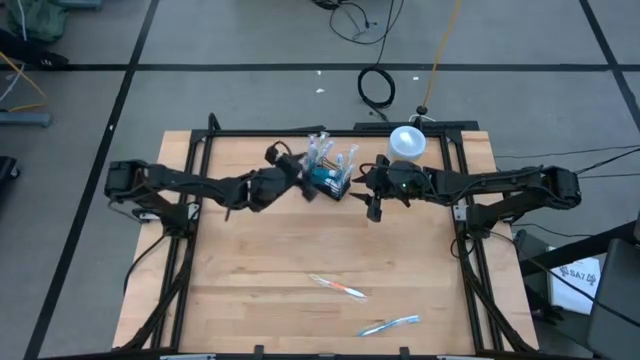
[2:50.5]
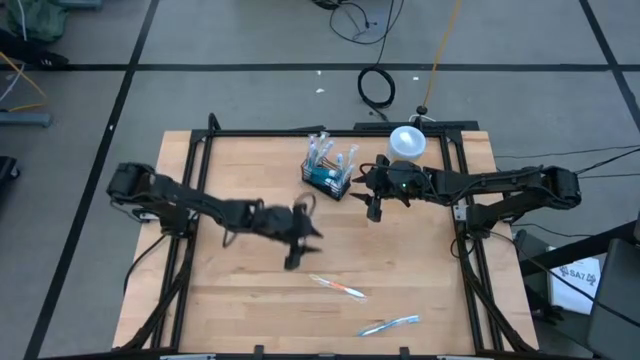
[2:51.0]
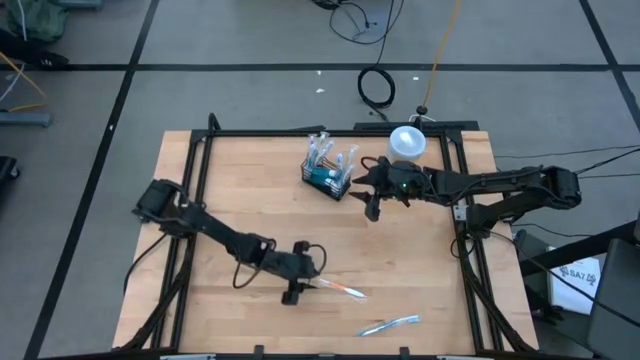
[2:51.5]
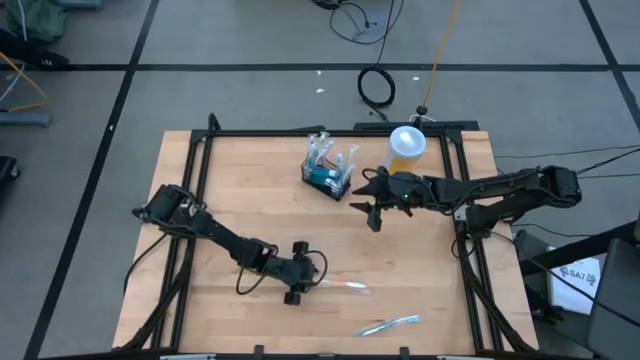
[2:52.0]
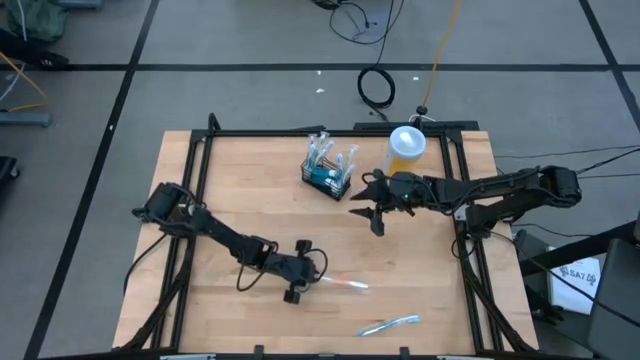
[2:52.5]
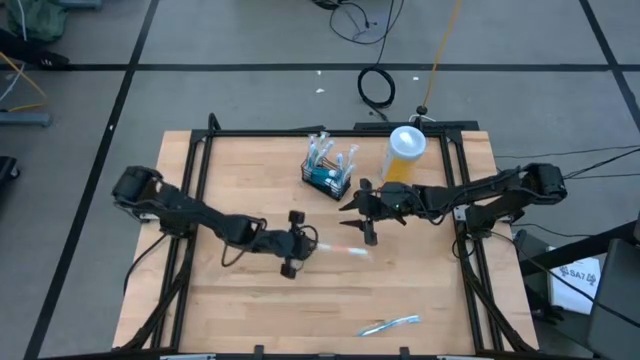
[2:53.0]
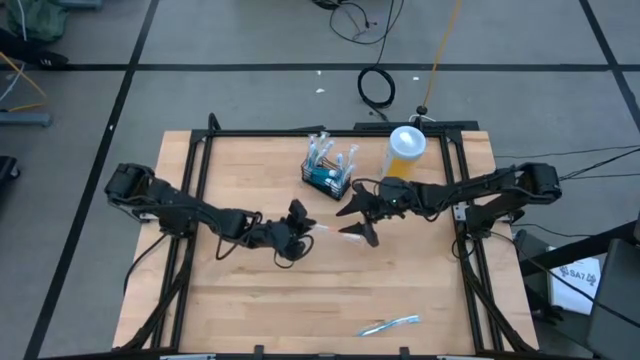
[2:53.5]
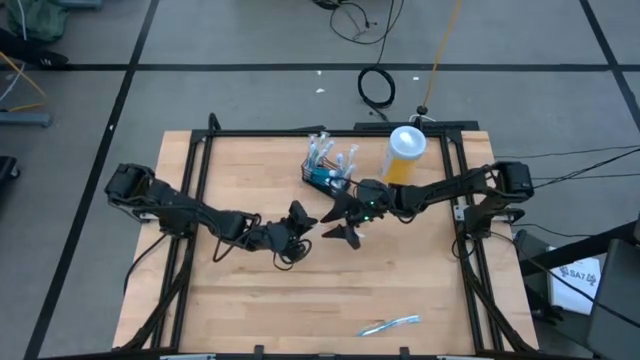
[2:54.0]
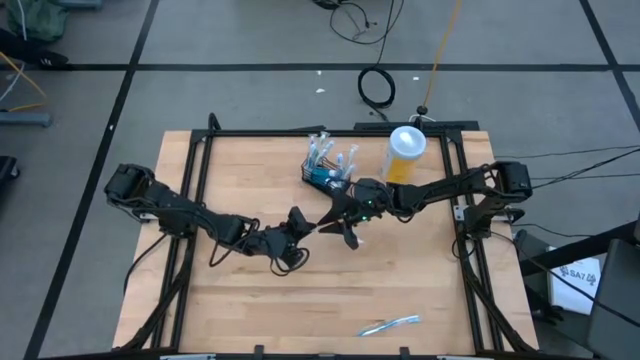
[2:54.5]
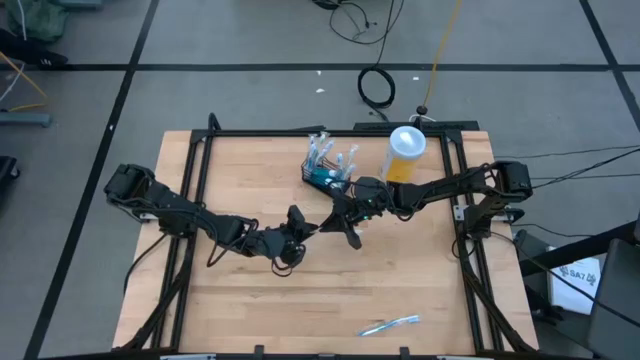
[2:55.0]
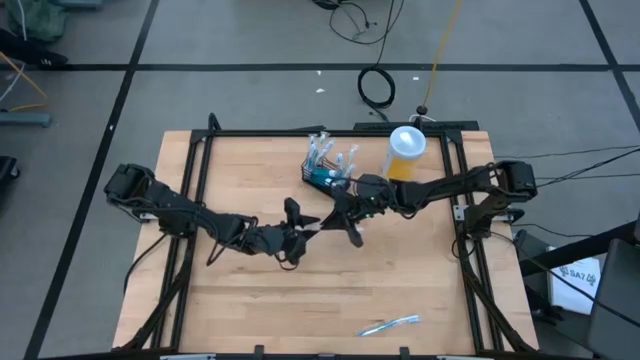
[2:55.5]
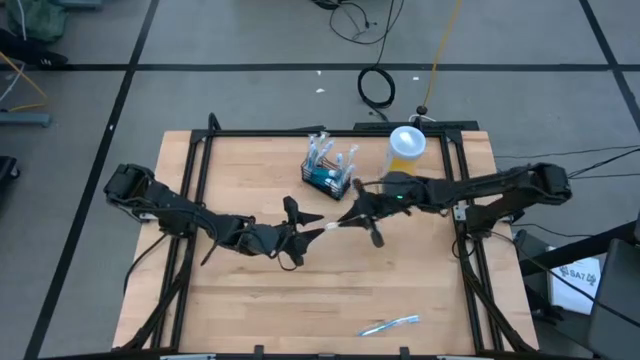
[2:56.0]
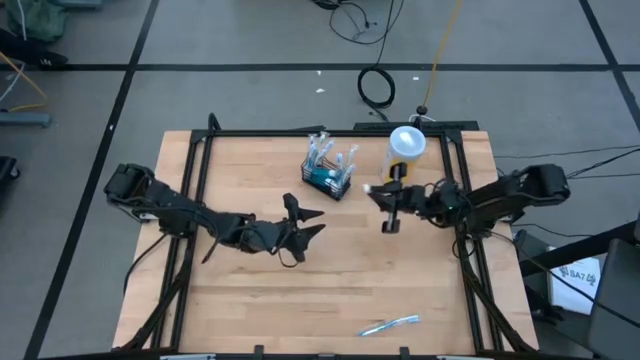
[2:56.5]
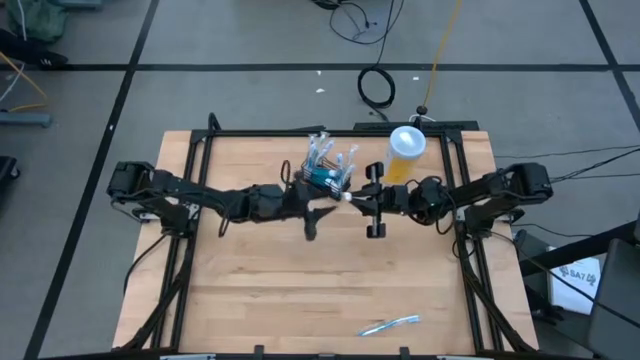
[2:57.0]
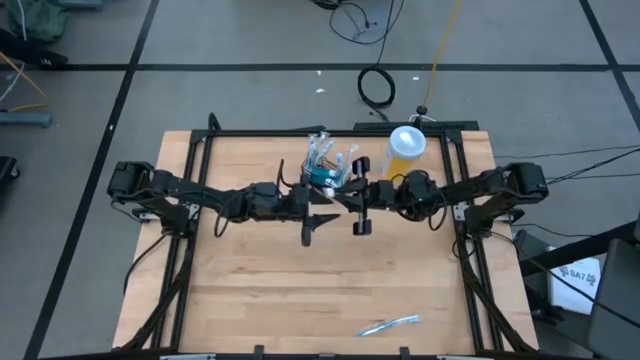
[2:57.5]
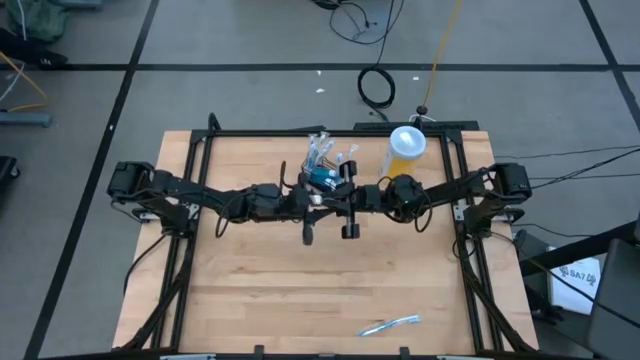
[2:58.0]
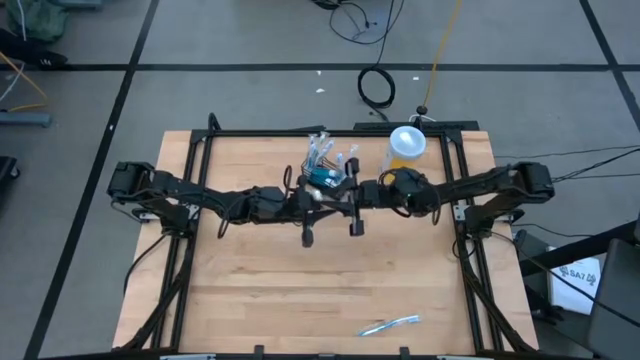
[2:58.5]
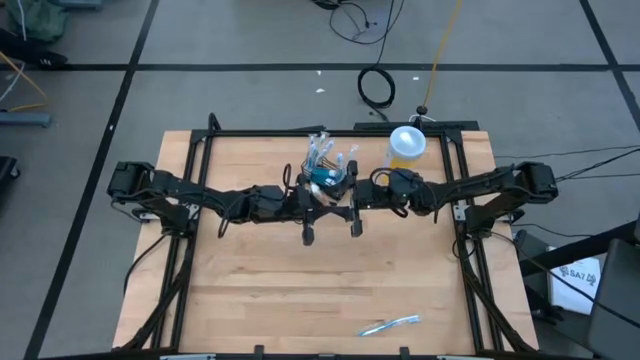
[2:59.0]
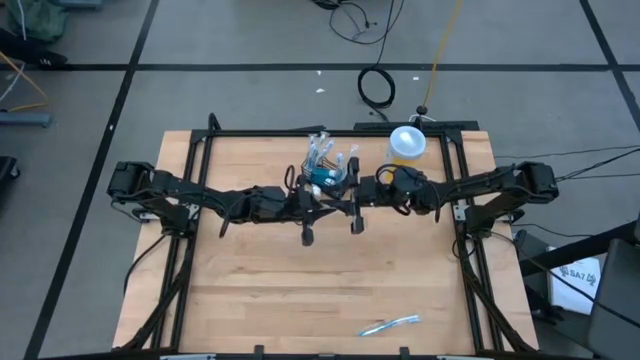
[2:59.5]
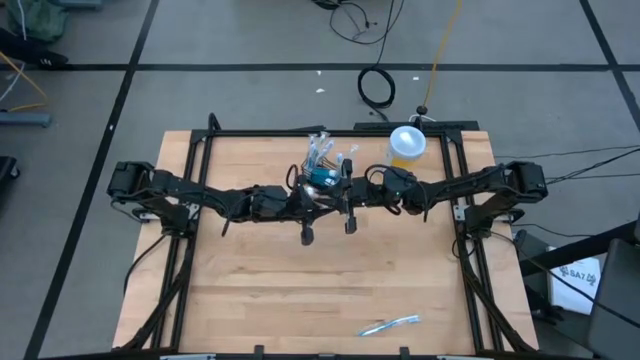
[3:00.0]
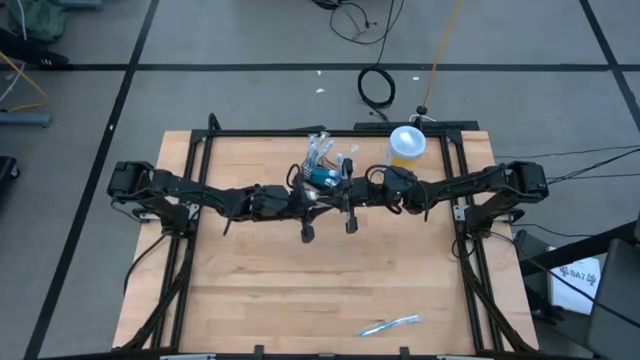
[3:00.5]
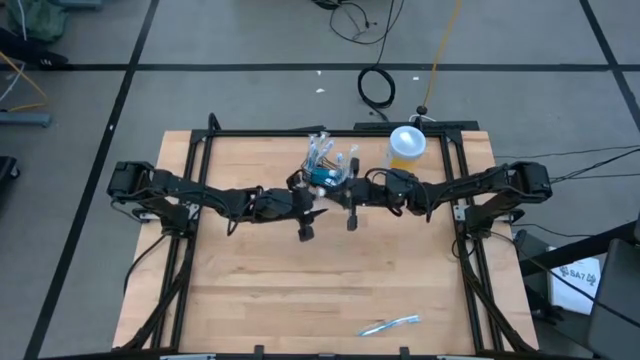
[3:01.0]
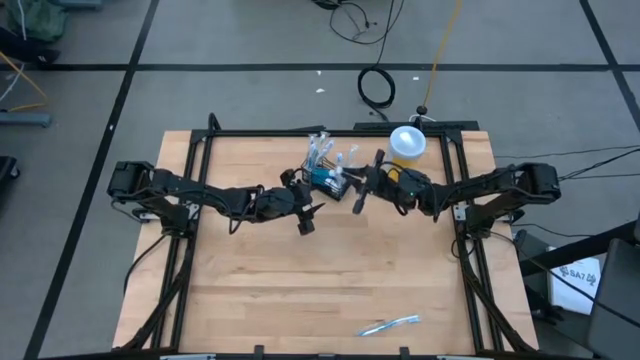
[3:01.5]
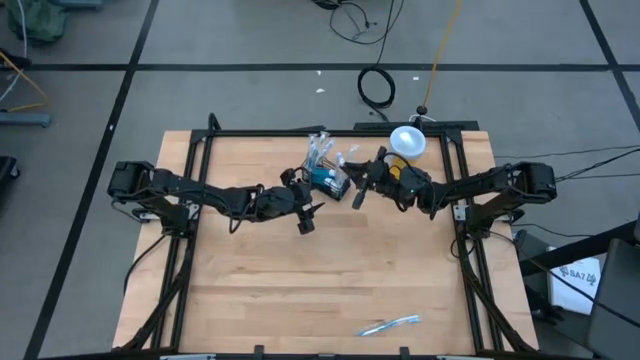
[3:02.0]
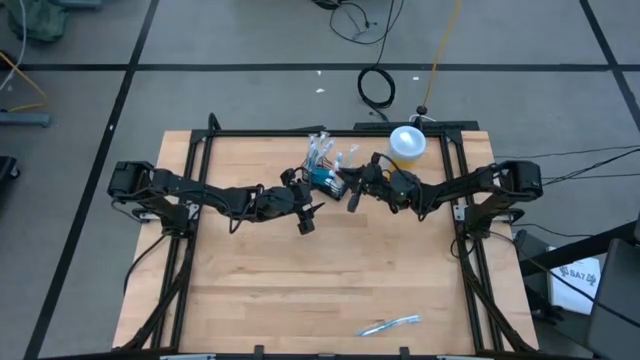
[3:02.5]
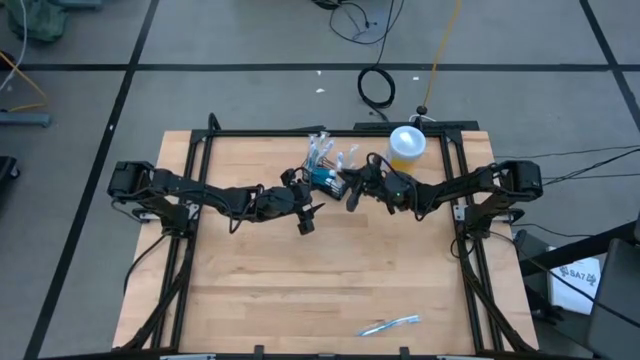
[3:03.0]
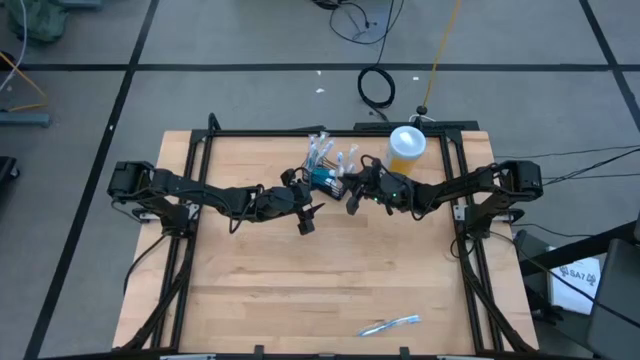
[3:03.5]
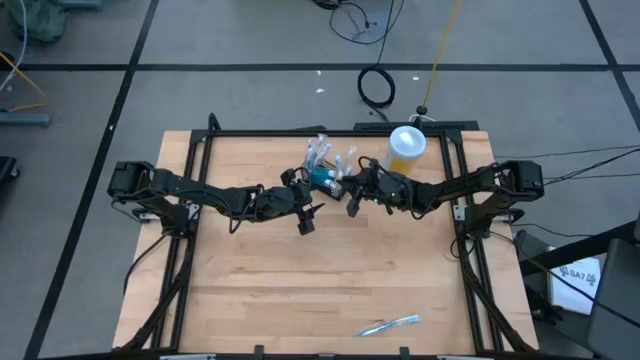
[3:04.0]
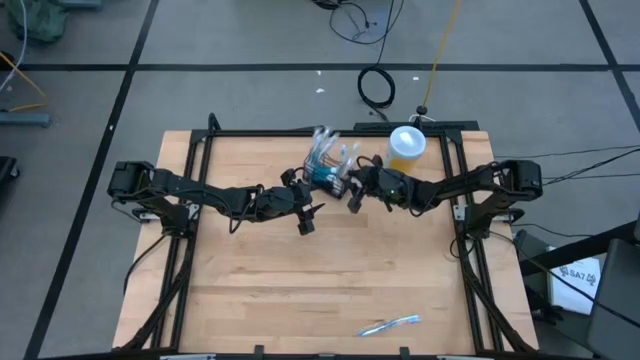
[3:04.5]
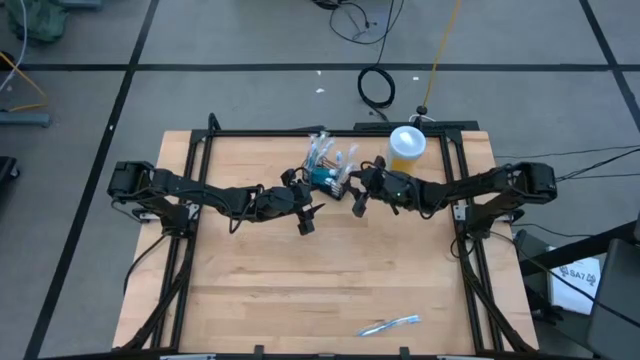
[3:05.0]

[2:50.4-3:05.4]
Task: Pick & Place toothbrushing station
Put the orange toothbrush into the black organizer

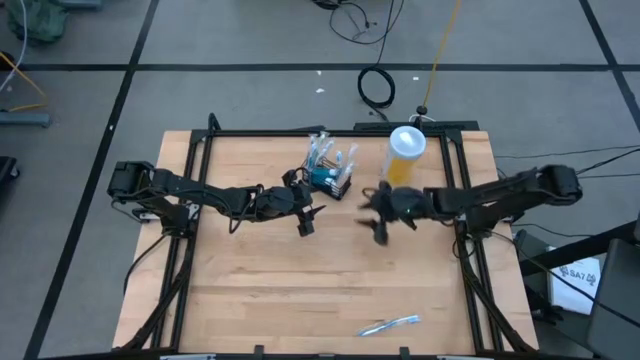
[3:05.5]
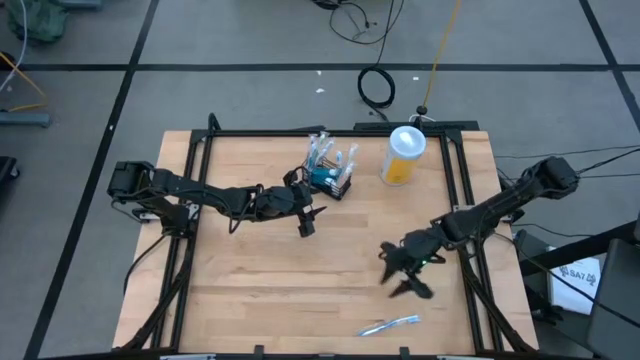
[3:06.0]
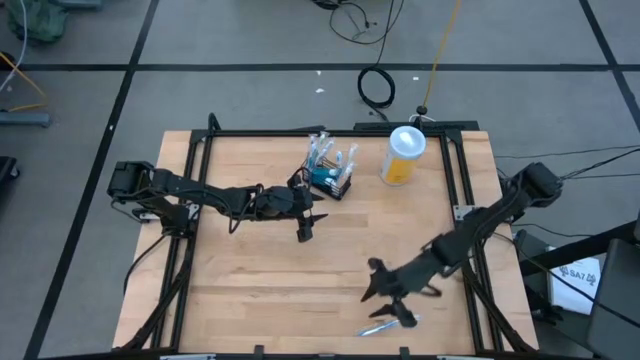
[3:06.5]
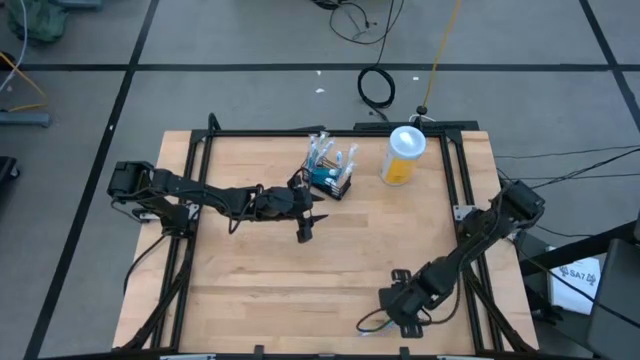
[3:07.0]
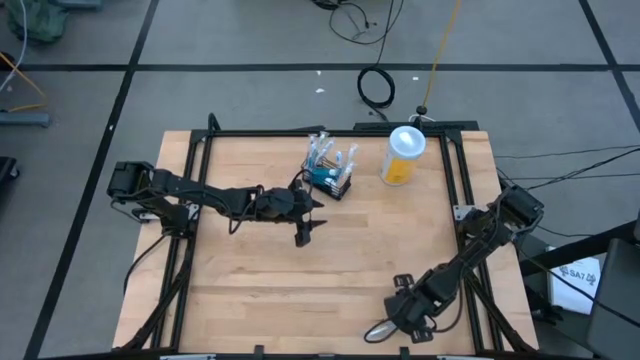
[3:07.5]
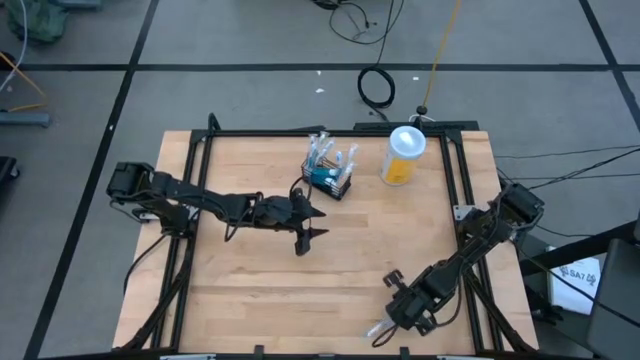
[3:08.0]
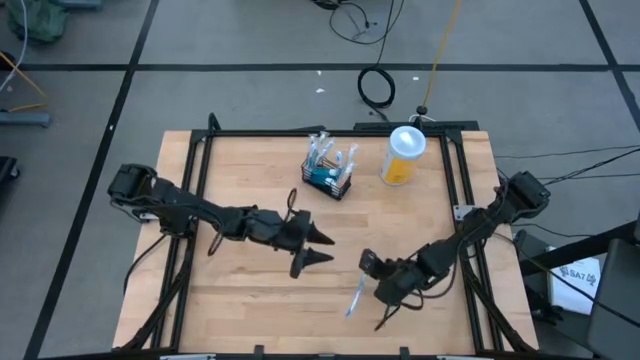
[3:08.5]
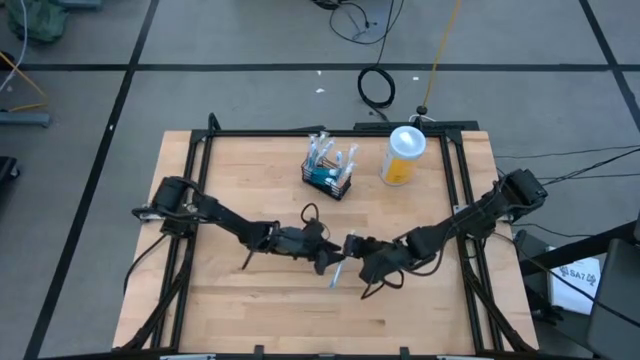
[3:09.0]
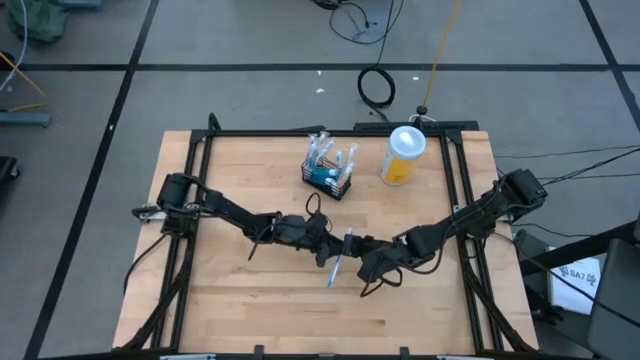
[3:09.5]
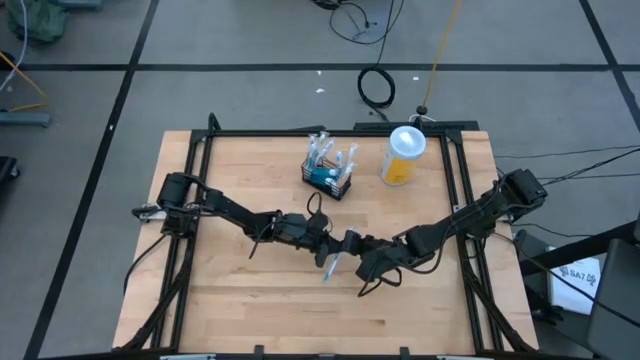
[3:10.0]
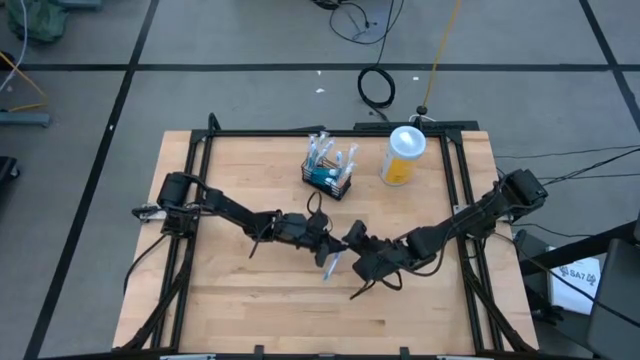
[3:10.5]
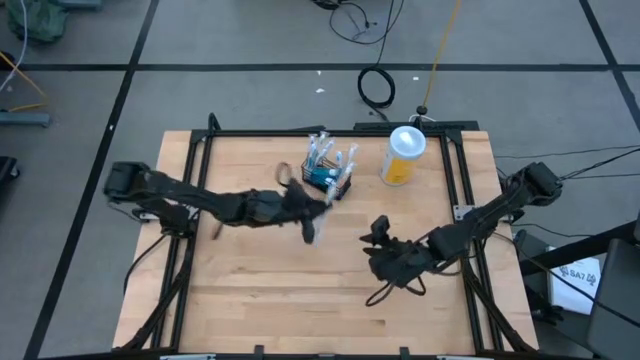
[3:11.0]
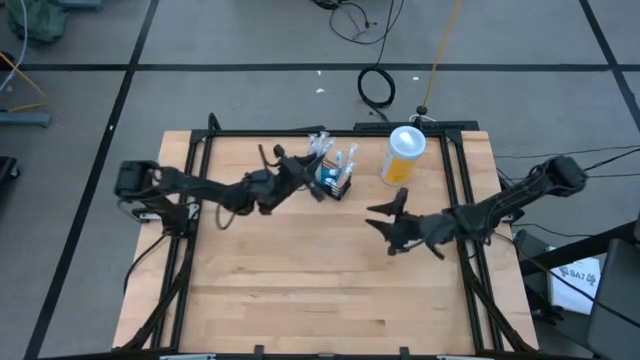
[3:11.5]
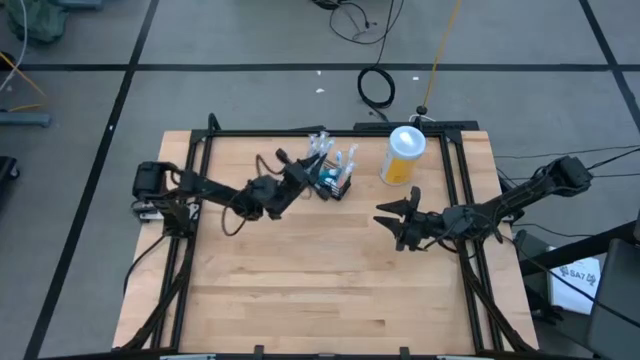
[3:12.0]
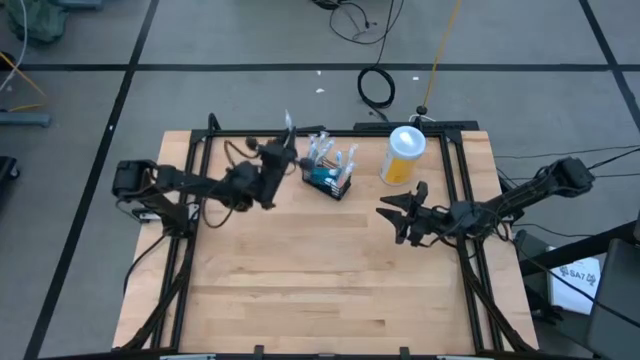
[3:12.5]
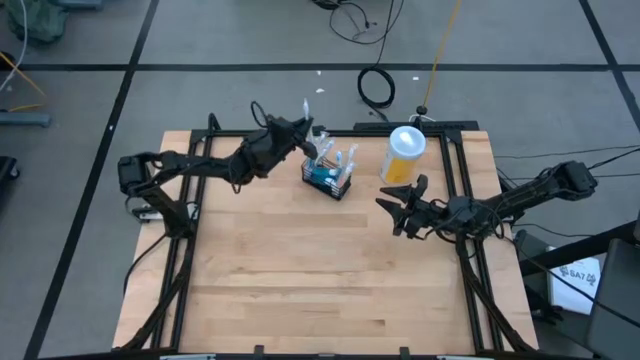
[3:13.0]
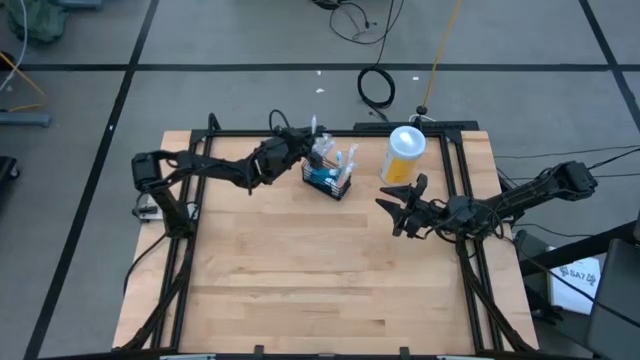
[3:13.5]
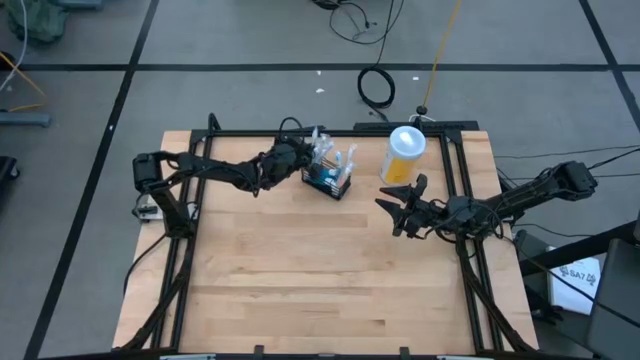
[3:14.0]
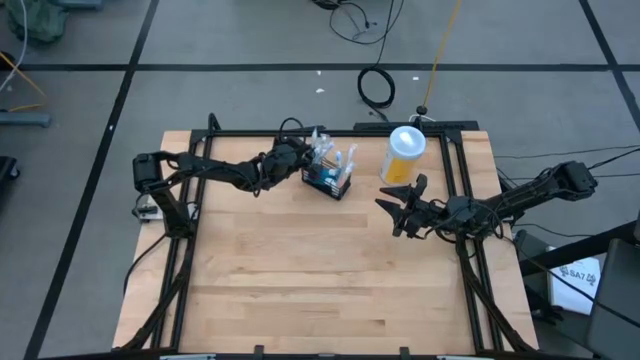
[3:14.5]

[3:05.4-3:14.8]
Put the blue toothbrush into the black organizer
